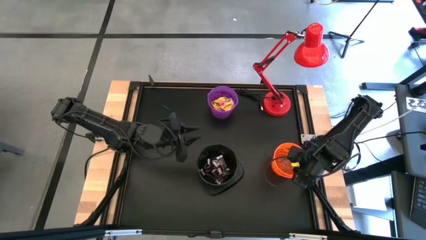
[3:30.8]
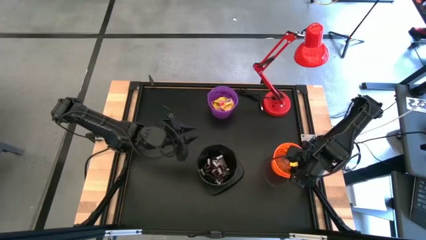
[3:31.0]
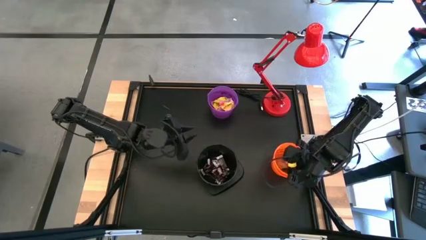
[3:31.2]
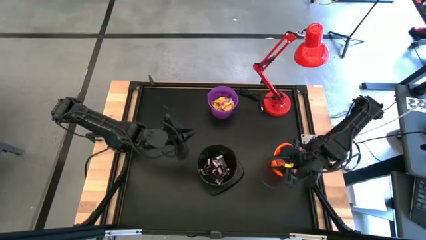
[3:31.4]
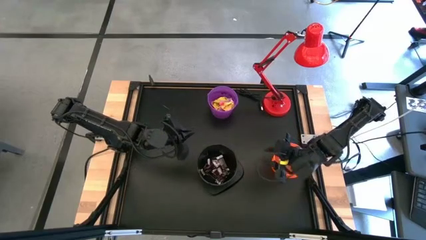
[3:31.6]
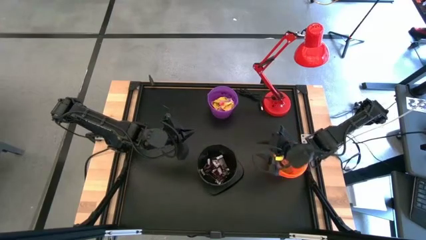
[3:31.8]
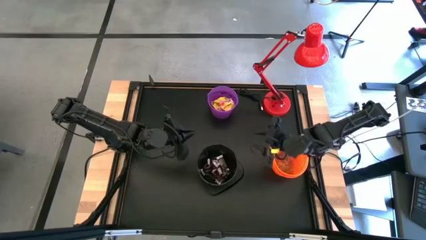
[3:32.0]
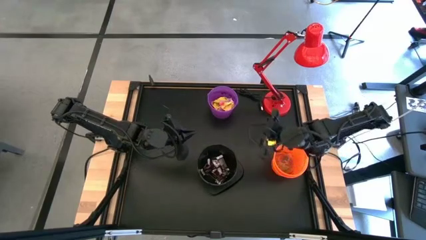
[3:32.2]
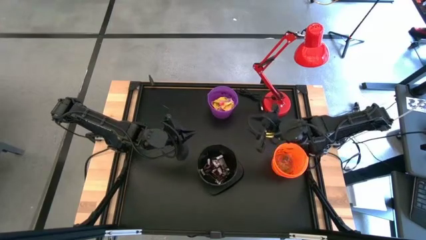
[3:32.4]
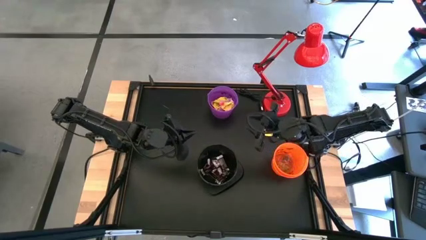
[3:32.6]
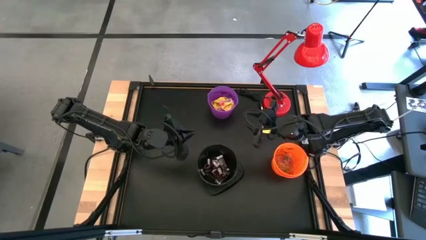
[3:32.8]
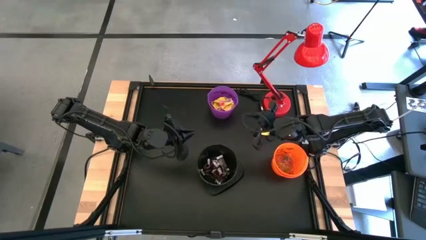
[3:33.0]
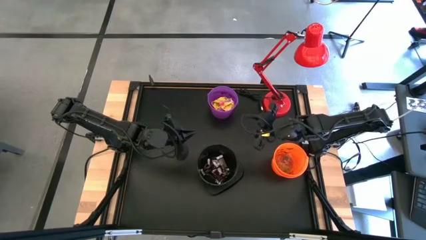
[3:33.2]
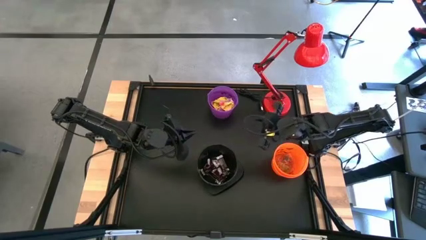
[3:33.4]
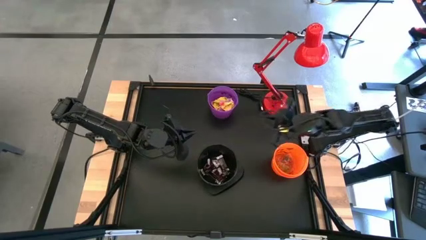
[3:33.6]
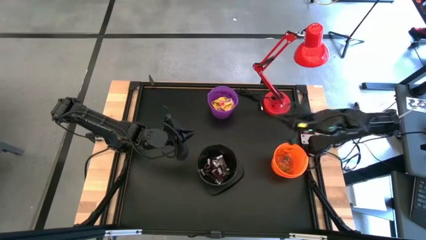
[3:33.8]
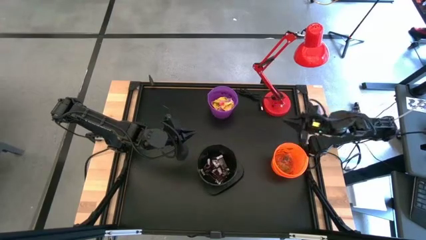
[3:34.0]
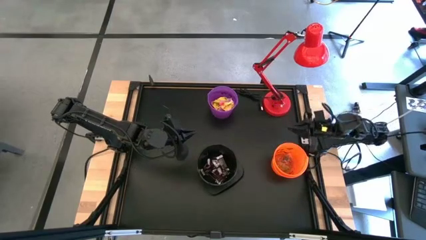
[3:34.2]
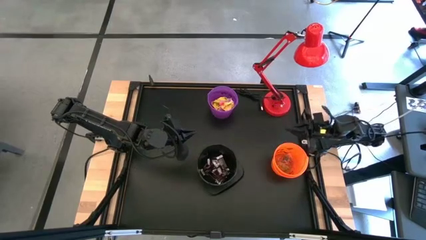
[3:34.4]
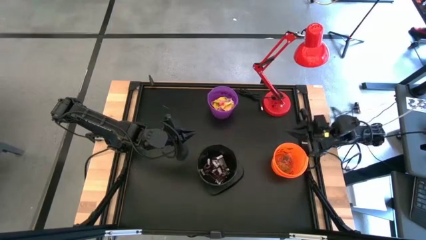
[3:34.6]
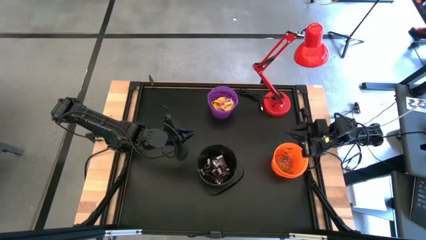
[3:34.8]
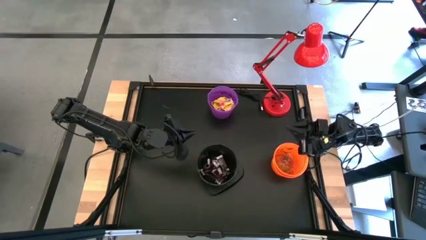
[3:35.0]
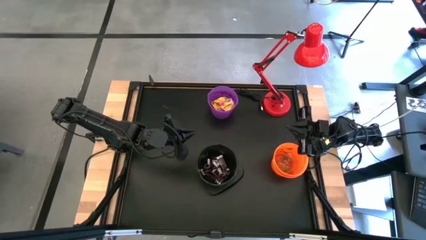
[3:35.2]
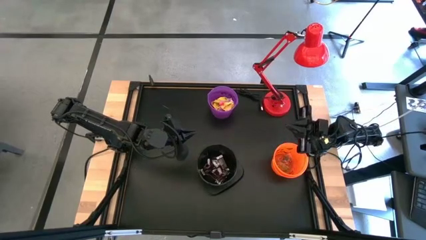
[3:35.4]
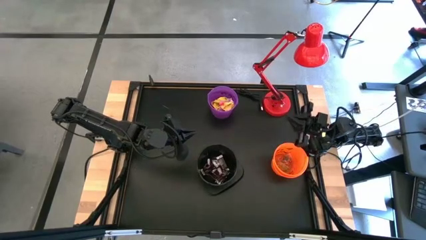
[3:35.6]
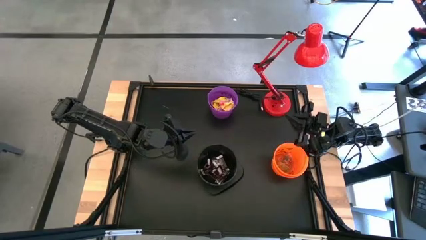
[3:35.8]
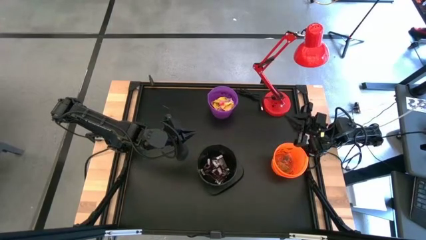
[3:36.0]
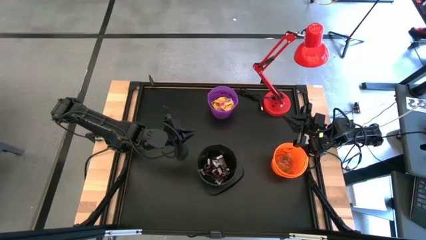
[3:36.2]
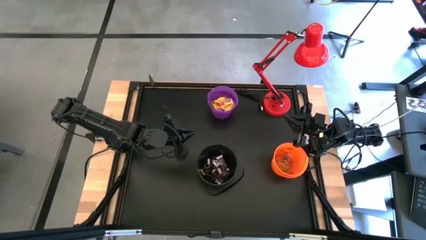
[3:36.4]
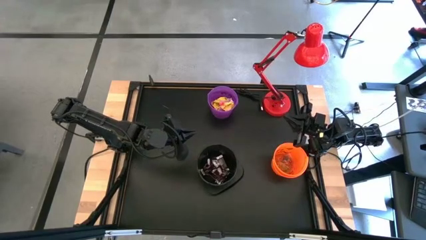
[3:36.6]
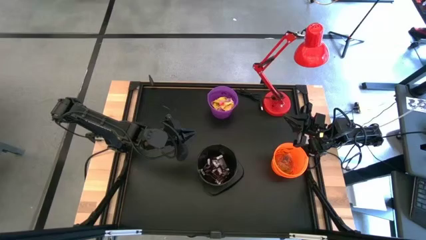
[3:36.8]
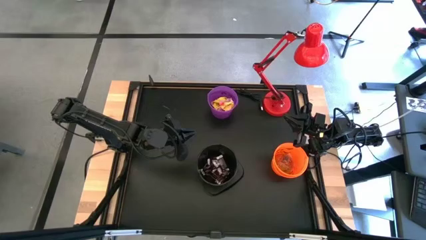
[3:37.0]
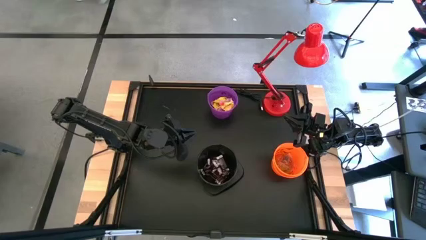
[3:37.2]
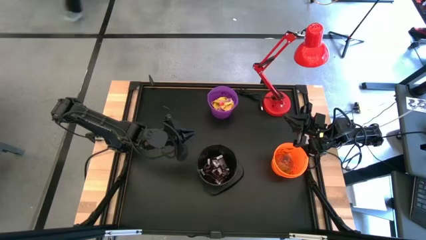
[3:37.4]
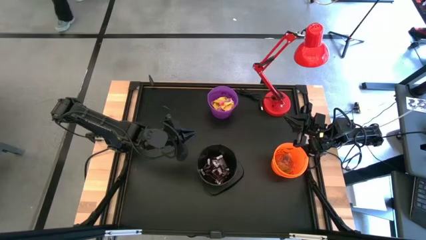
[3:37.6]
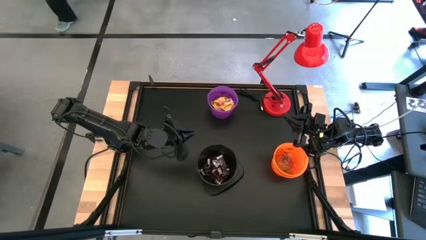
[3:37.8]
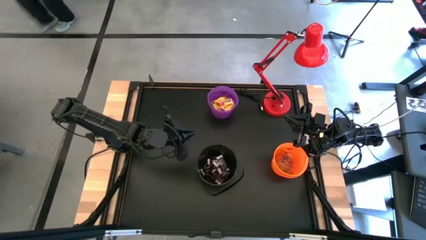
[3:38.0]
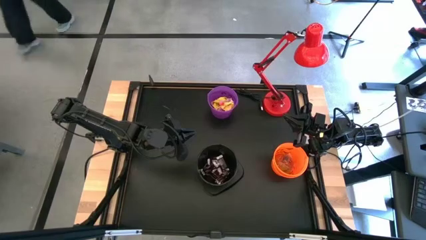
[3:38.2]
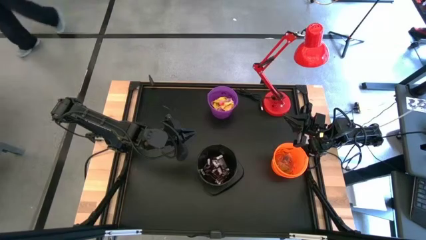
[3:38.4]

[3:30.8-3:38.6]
Task: Sort candy
Return to Home Position

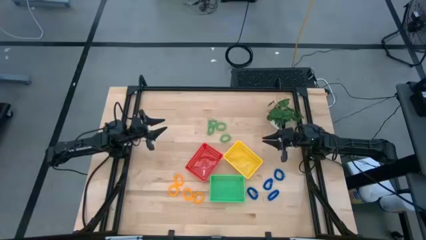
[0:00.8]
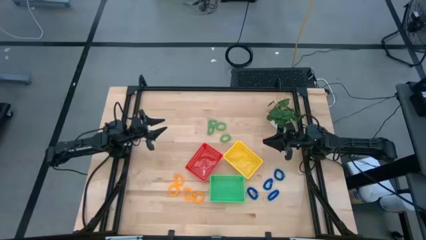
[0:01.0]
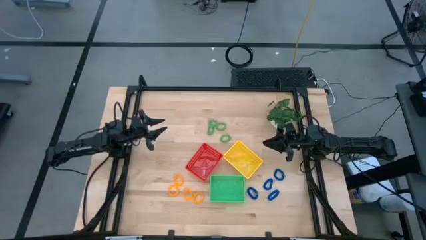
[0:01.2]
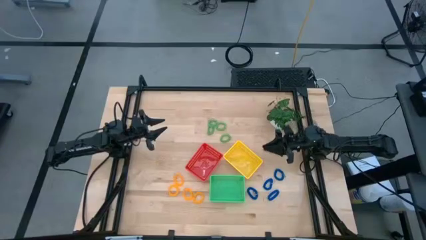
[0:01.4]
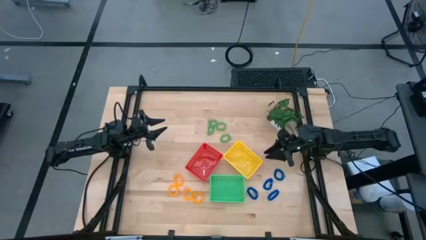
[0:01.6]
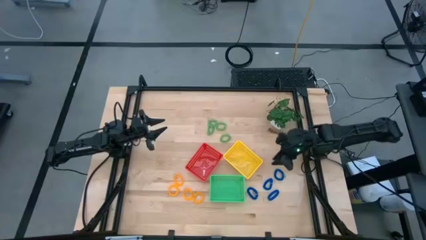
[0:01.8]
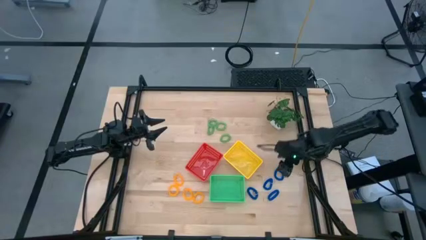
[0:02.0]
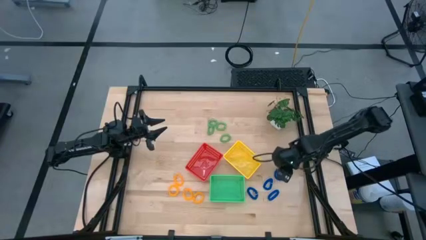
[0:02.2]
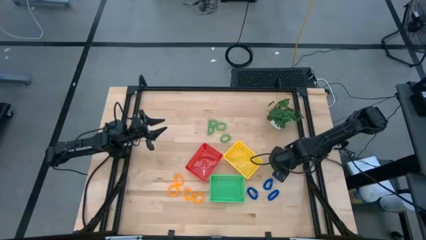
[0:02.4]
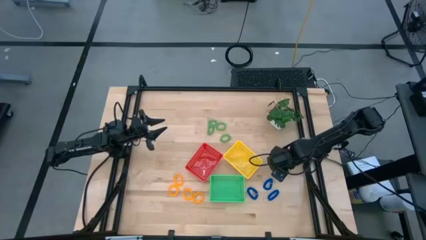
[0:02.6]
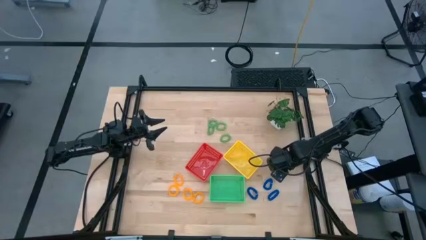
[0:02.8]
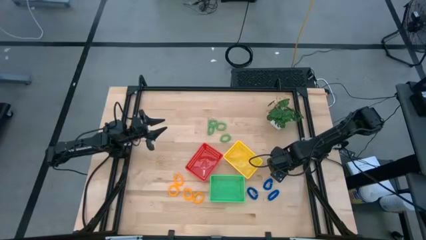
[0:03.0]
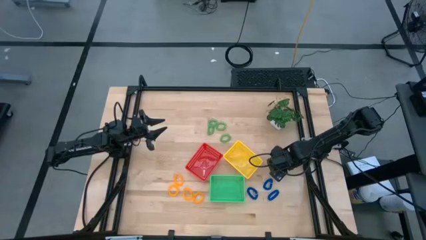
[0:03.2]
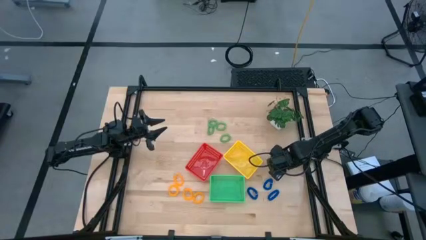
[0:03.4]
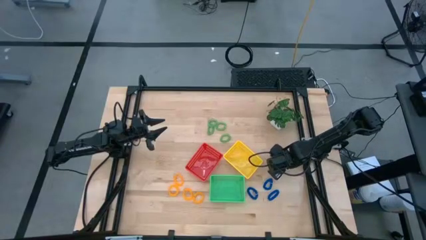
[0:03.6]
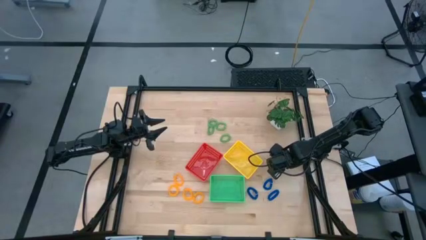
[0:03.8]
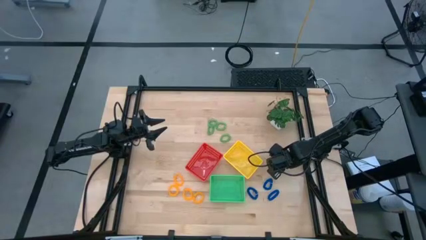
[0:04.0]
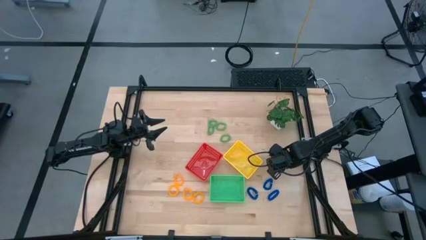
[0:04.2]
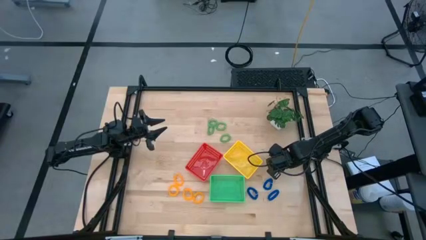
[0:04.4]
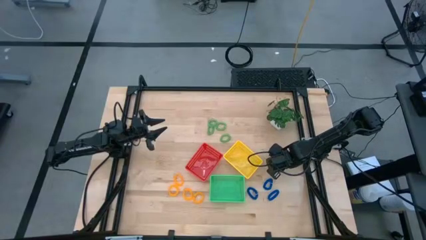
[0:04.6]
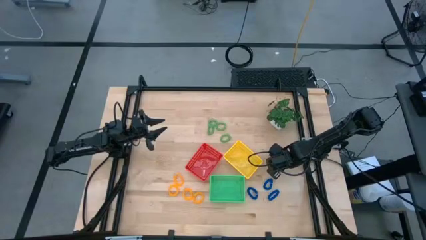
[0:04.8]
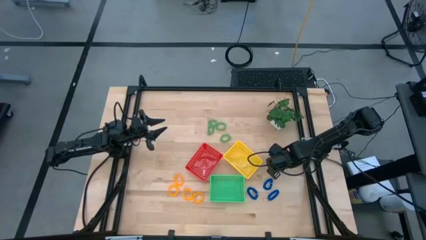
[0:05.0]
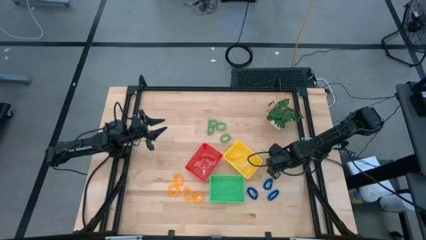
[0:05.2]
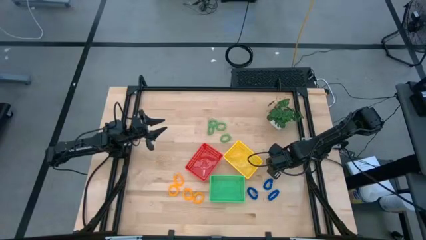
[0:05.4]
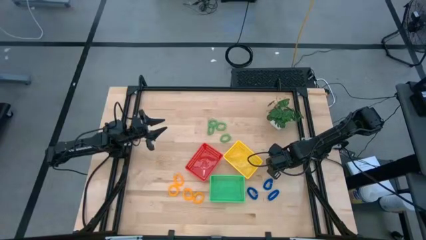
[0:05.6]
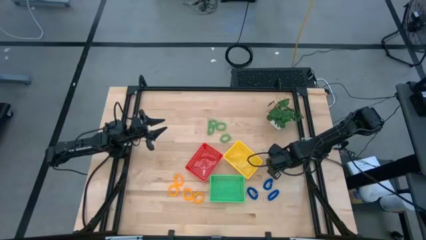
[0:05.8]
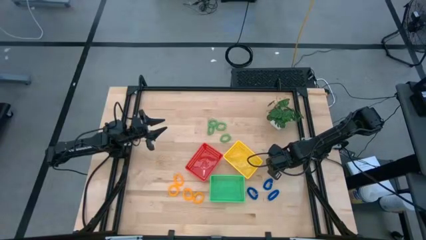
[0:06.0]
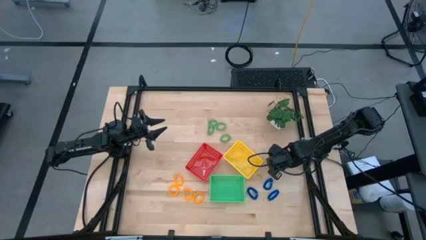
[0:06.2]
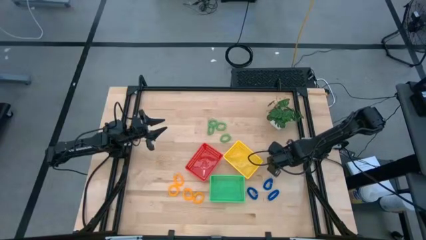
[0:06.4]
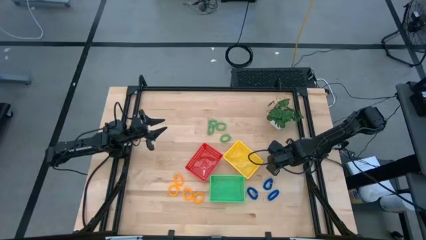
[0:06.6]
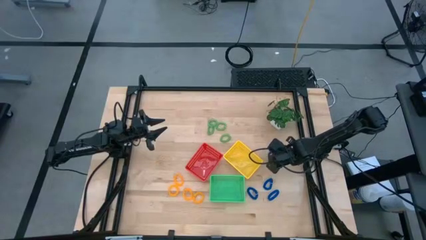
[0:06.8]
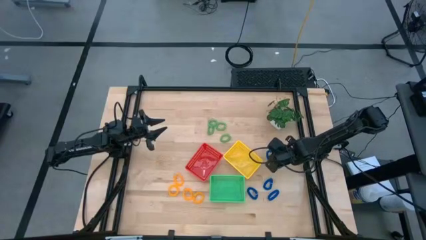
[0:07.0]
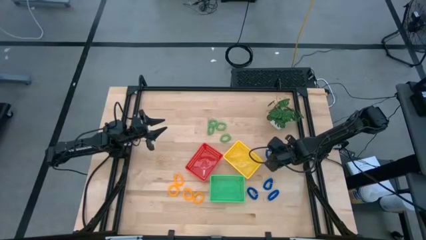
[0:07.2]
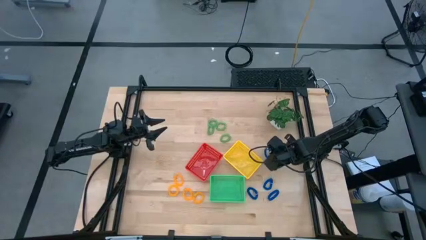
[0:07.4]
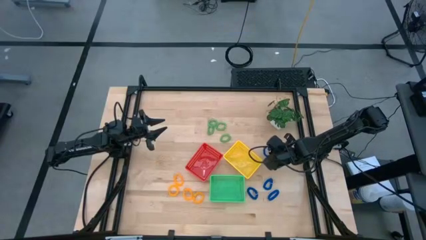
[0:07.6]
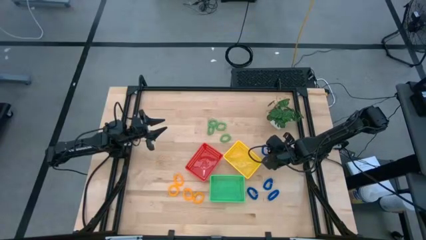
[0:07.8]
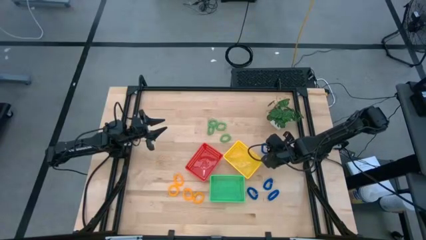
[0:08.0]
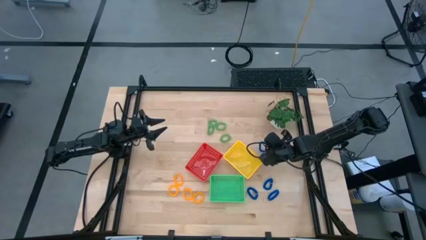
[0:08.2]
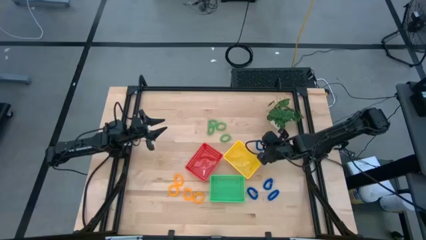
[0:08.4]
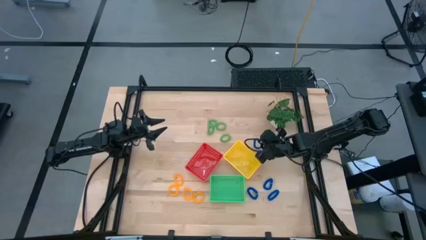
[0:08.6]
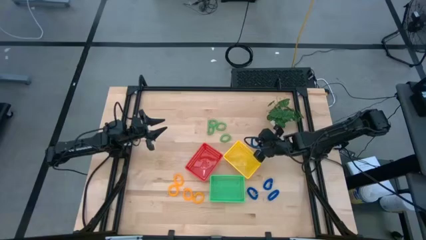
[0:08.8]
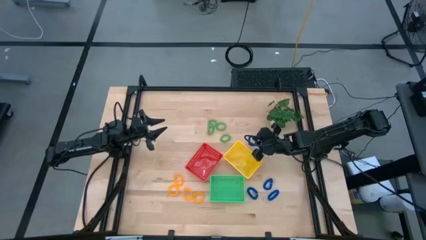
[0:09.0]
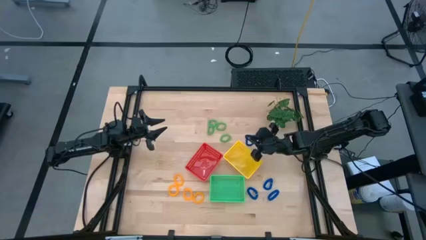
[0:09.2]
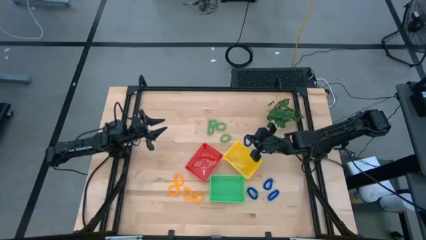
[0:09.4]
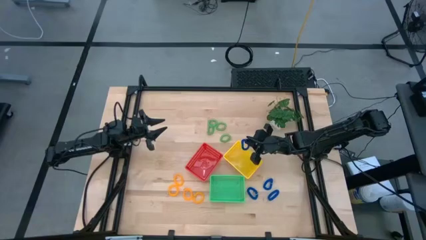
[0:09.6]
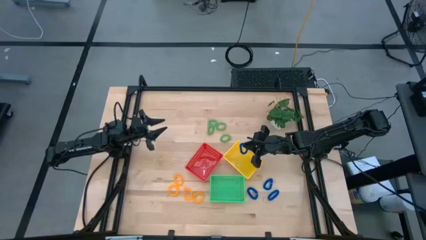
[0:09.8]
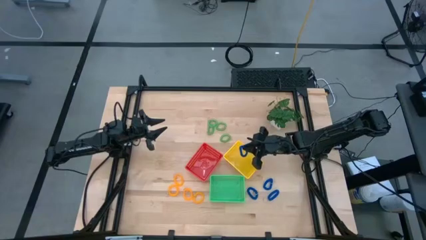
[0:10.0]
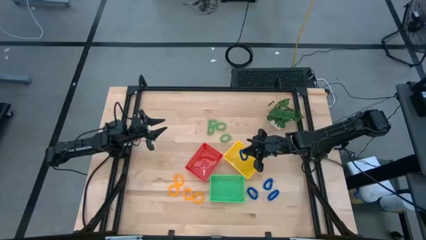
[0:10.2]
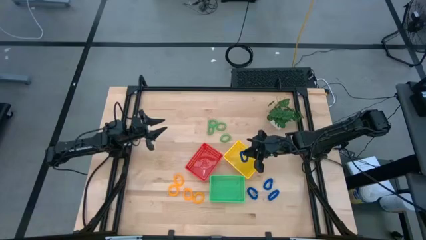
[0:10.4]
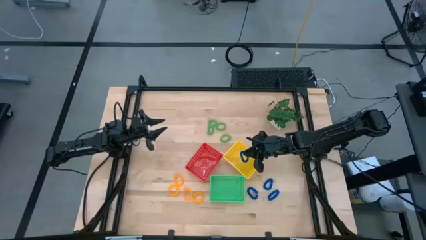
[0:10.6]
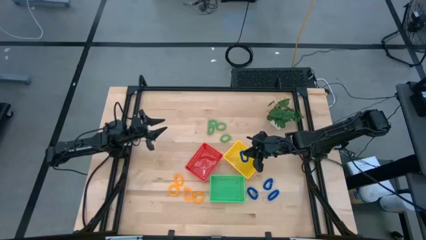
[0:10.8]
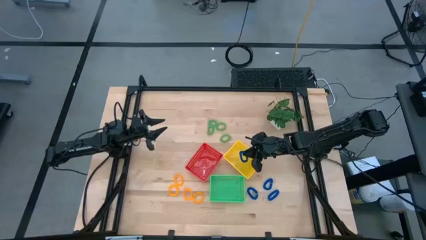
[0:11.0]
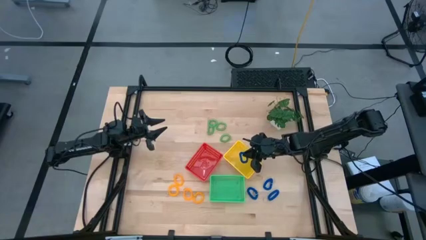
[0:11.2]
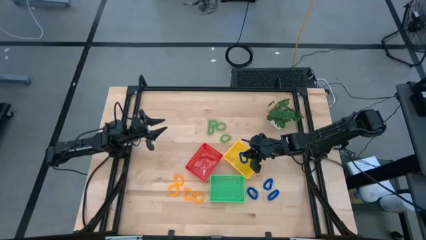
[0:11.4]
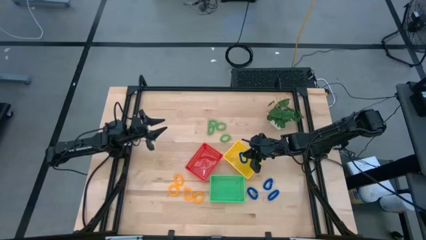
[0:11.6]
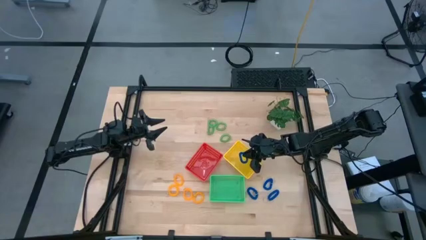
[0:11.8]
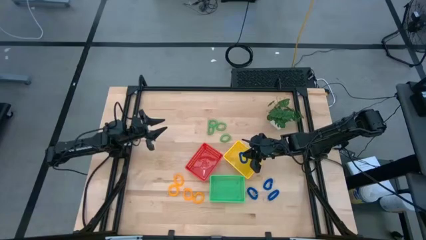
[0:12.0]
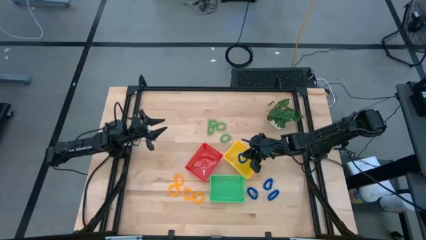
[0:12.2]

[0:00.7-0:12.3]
Task: Sort spring keychains
Put the blue spring keychain into the yellow bin
